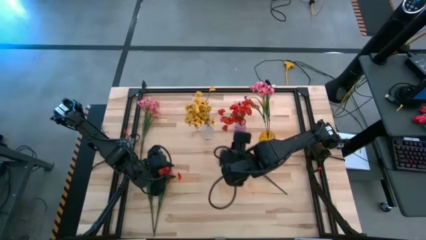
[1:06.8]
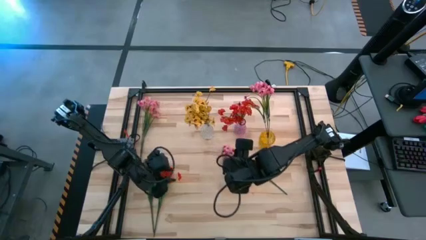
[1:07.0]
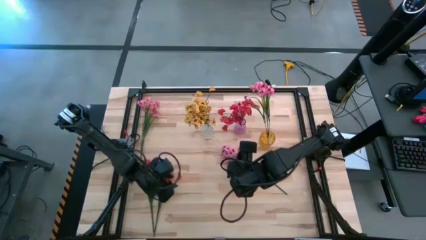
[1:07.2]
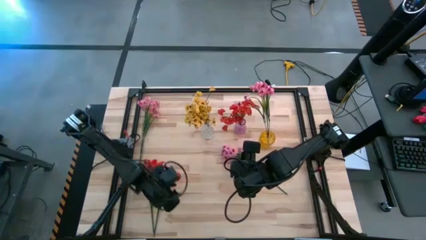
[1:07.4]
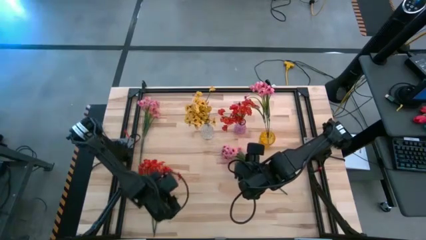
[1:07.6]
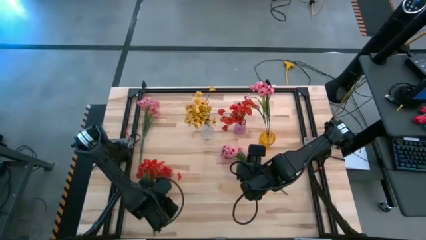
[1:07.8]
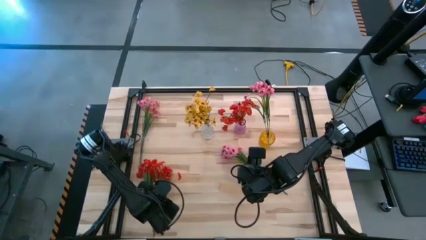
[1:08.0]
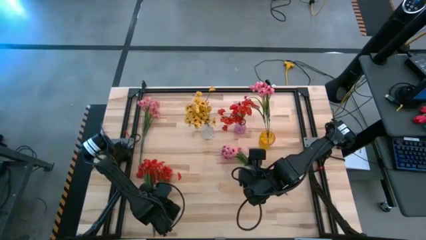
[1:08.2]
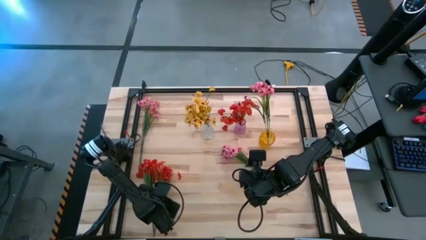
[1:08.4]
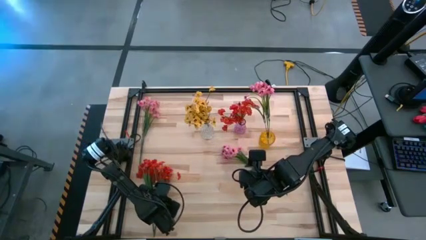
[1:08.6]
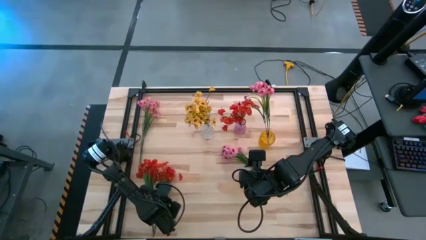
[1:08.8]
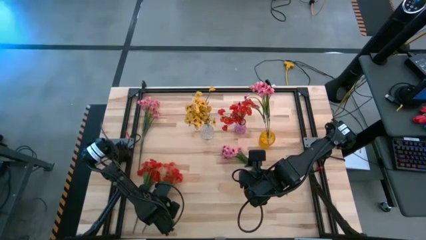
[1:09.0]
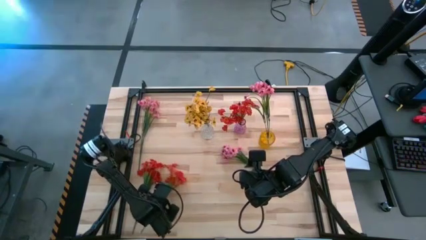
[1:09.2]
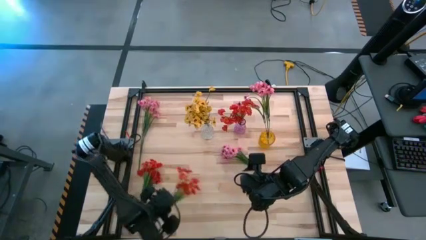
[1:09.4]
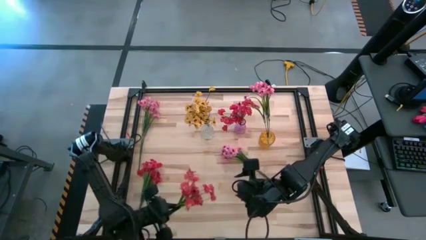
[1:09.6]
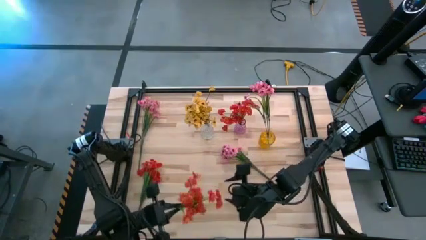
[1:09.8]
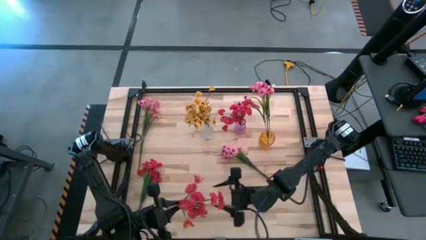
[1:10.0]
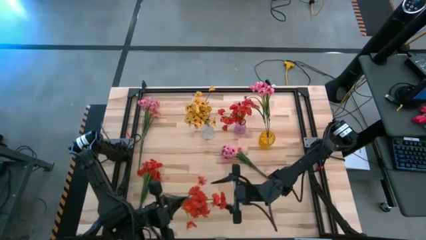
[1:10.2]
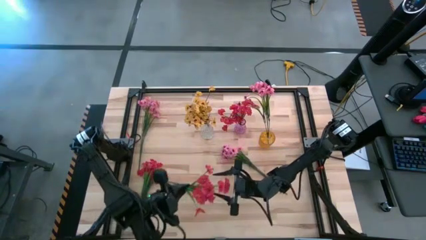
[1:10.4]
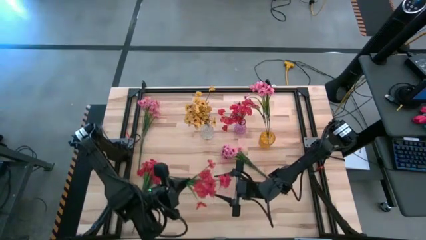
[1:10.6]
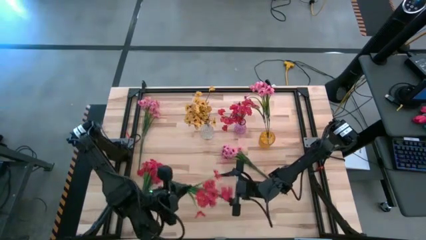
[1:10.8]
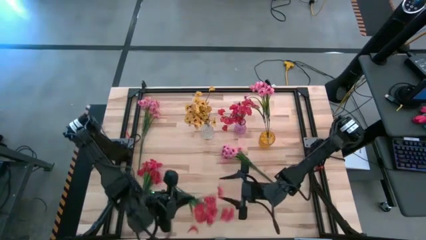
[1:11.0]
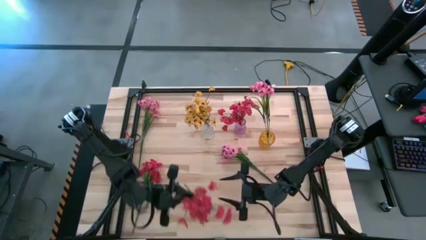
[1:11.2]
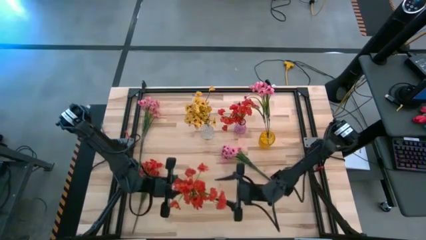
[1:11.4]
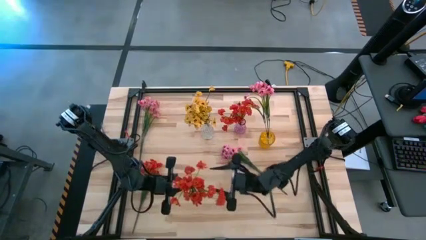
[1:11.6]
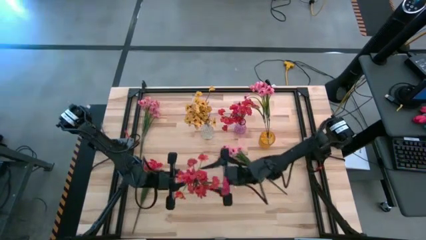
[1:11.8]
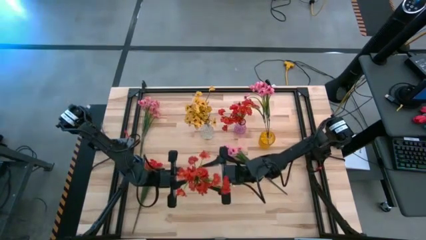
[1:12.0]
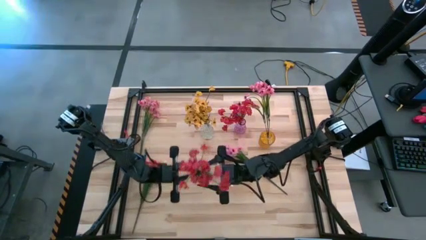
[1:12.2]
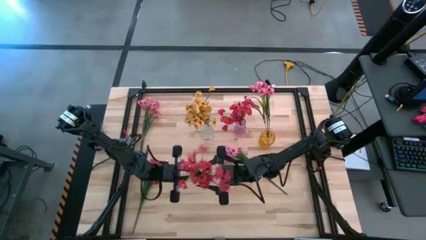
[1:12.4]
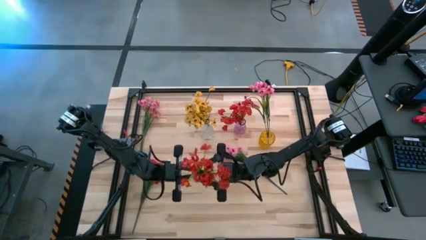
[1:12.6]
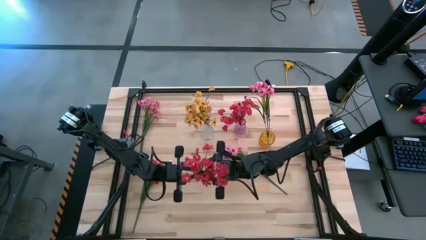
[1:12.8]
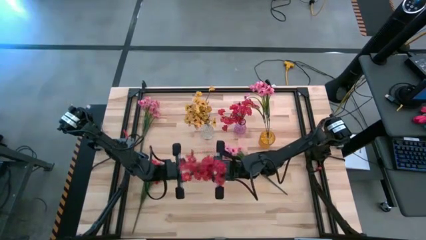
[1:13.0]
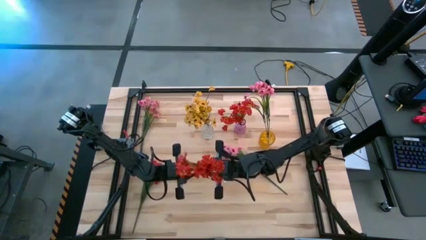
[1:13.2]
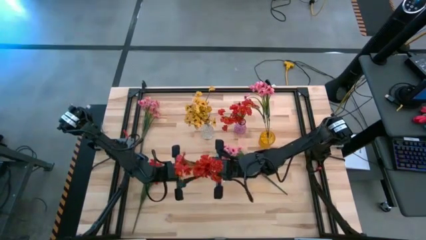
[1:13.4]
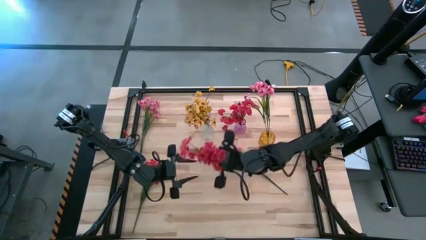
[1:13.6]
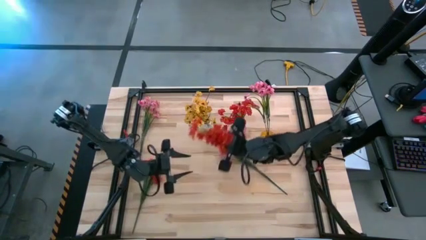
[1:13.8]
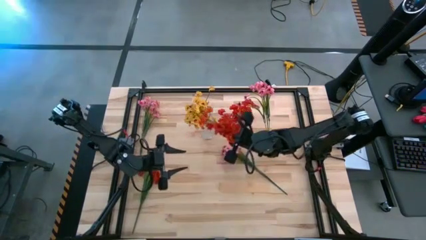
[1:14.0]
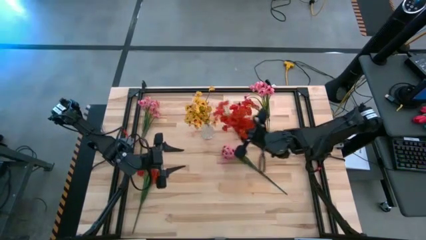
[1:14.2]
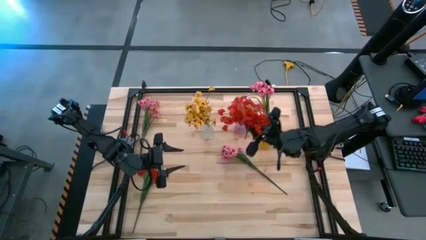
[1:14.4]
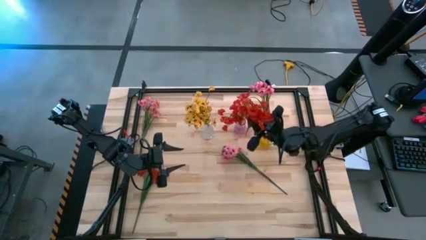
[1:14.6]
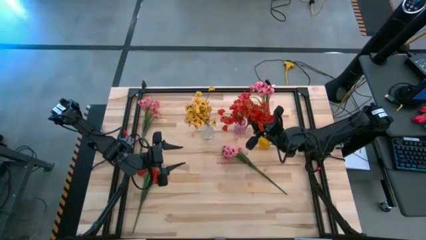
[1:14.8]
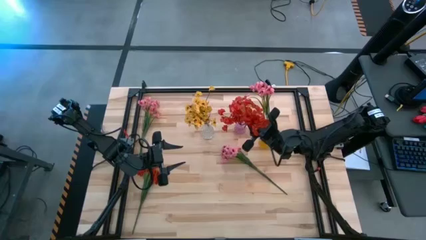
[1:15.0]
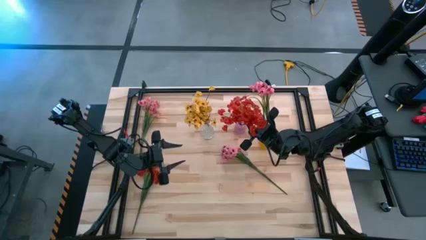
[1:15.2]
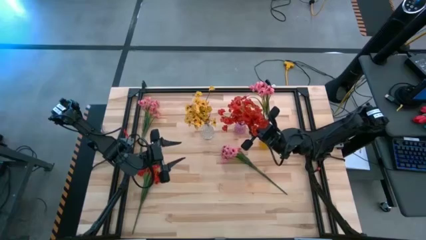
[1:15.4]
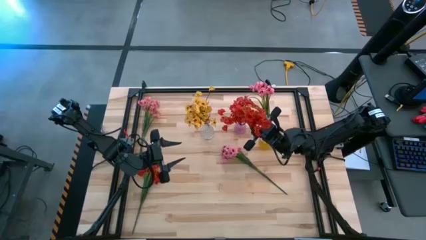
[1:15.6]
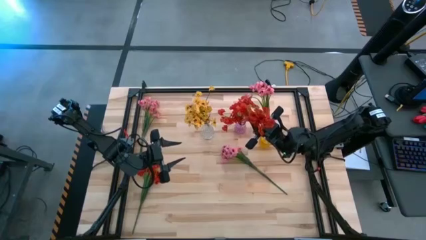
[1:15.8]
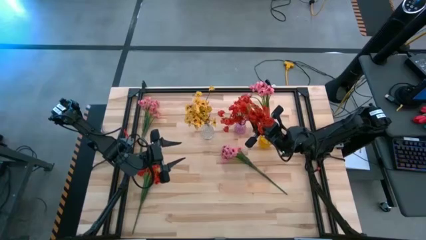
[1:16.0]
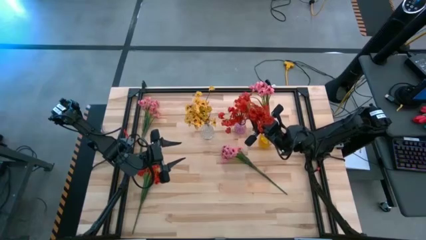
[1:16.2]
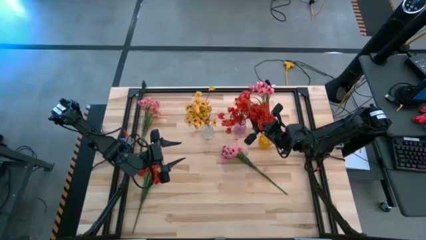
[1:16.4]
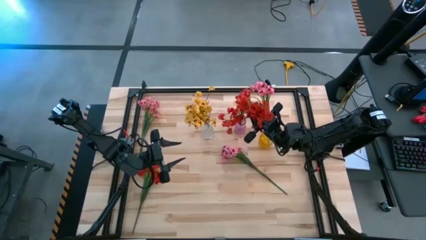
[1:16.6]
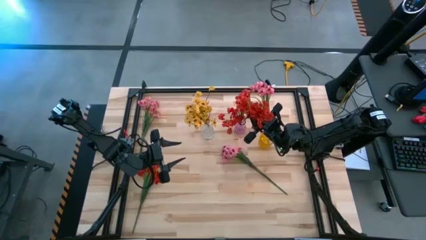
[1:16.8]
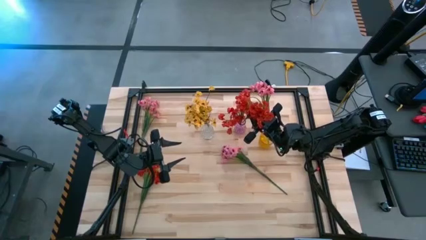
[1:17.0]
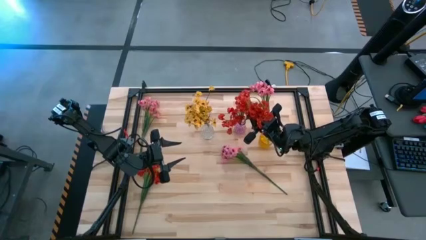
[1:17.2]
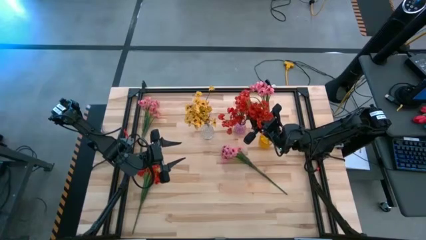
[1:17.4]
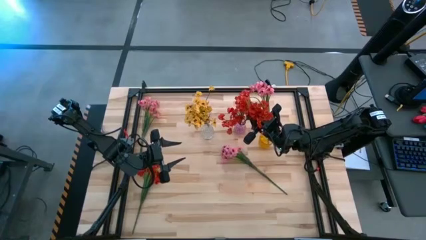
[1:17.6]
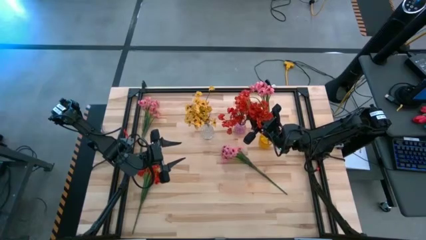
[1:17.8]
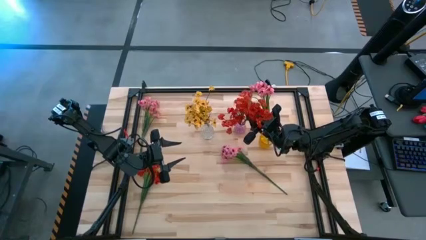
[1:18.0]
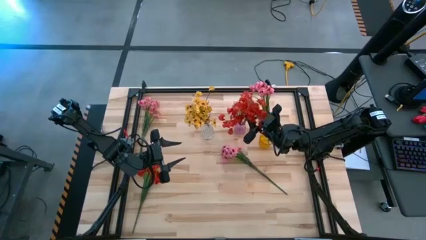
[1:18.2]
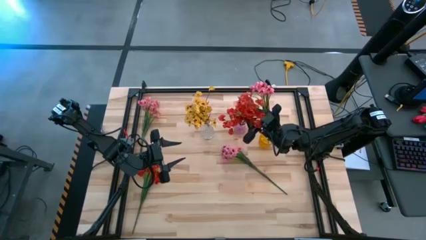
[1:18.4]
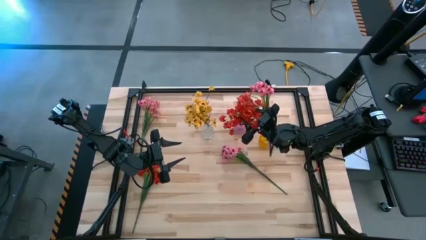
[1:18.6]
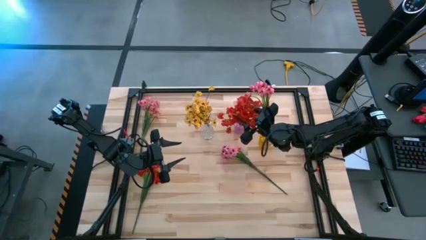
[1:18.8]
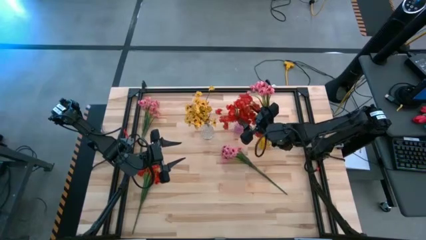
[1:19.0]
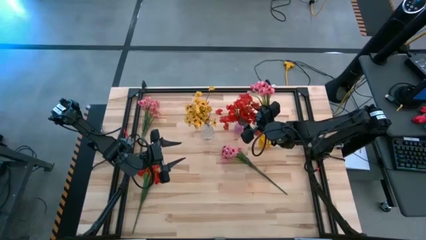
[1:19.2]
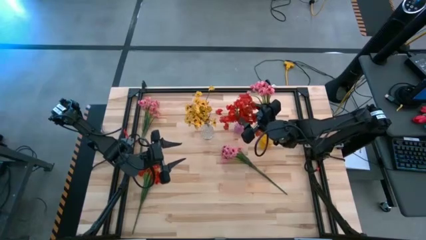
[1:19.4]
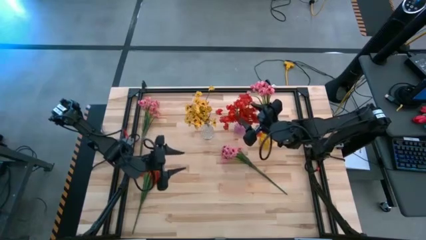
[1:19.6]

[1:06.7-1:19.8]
Task: Sort flowers into vase by color
Put the right red flowers into the pink vase

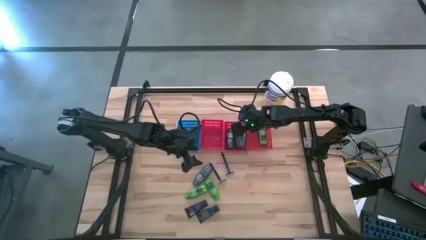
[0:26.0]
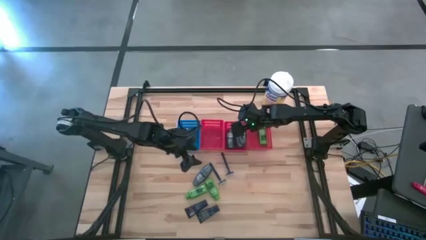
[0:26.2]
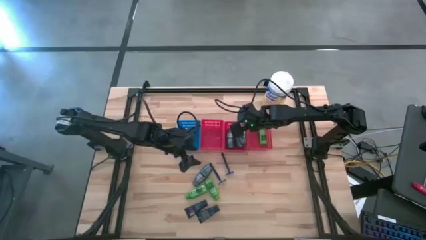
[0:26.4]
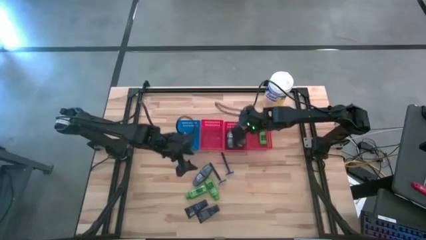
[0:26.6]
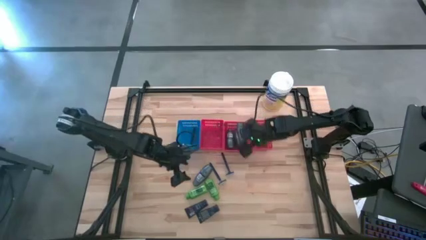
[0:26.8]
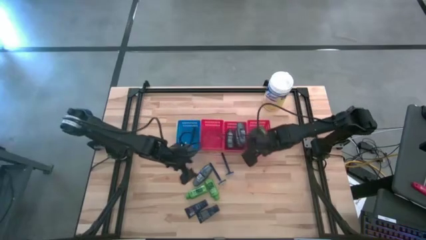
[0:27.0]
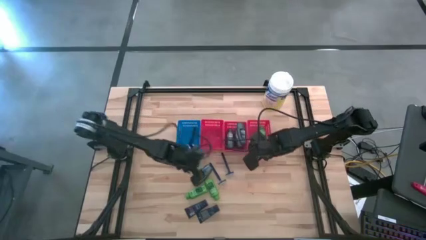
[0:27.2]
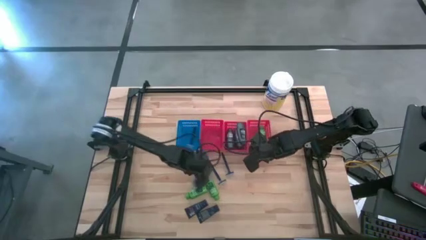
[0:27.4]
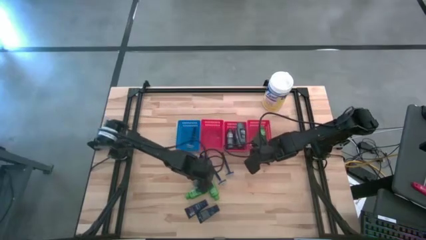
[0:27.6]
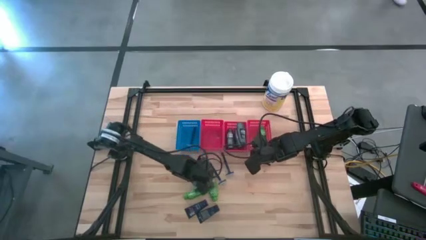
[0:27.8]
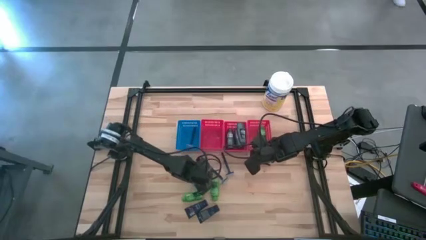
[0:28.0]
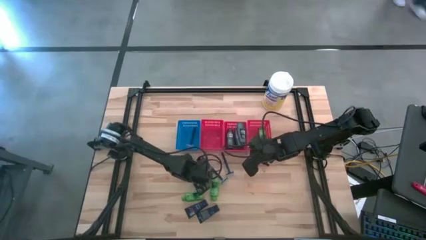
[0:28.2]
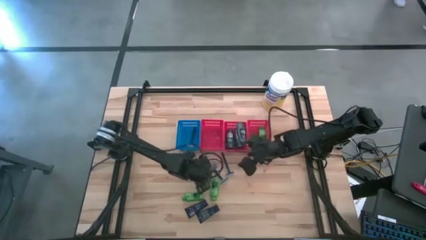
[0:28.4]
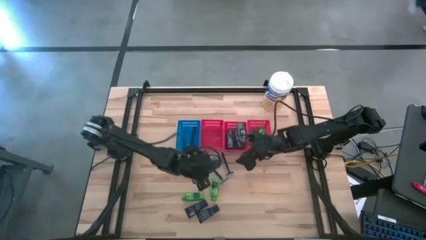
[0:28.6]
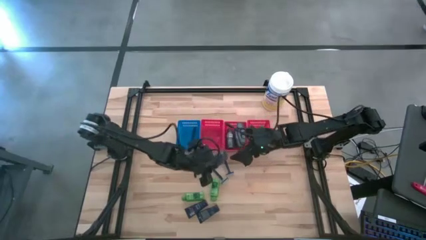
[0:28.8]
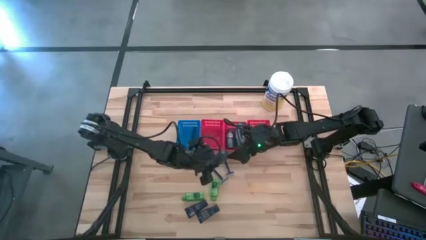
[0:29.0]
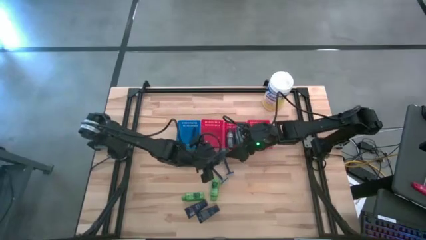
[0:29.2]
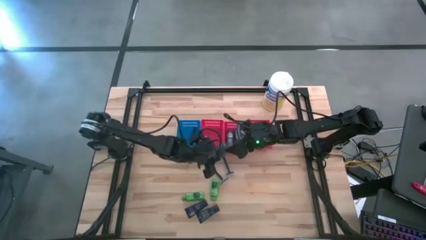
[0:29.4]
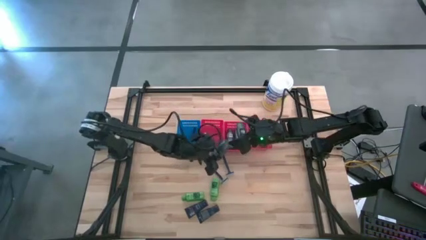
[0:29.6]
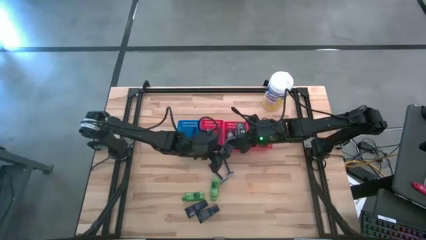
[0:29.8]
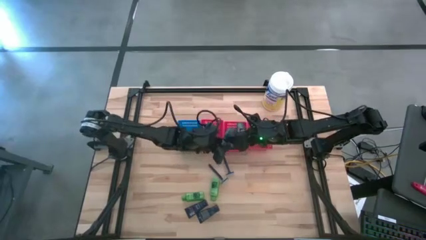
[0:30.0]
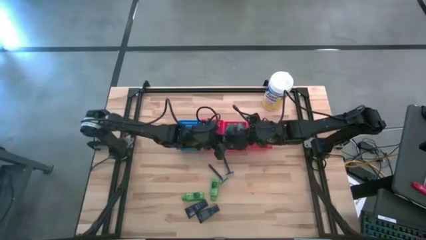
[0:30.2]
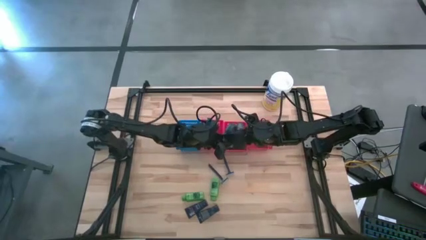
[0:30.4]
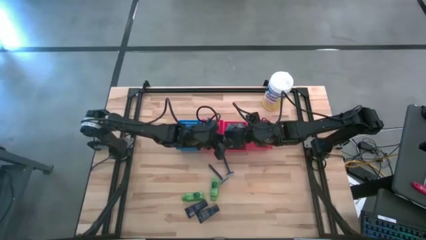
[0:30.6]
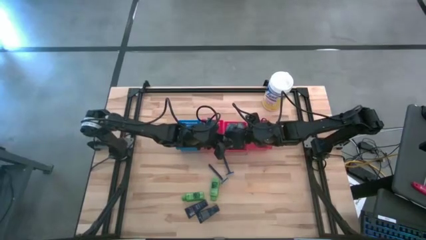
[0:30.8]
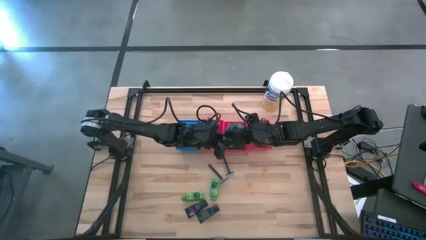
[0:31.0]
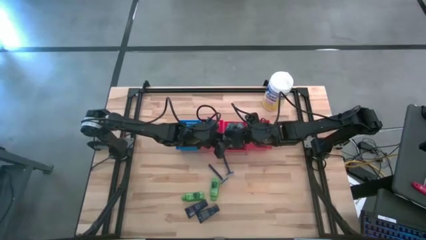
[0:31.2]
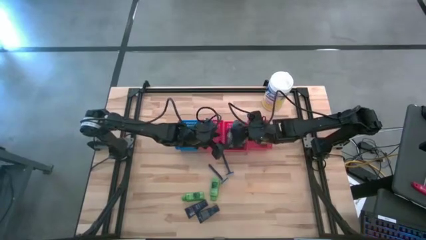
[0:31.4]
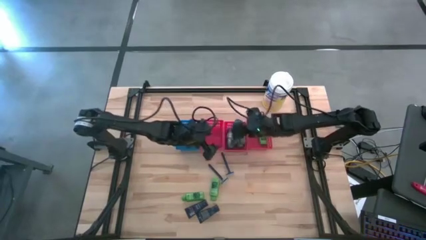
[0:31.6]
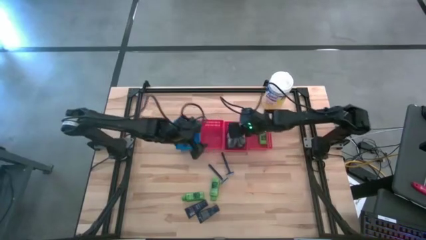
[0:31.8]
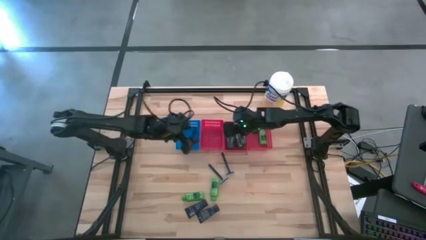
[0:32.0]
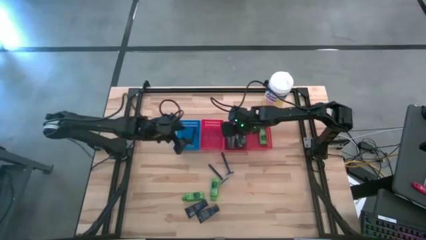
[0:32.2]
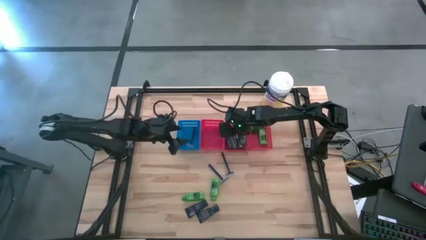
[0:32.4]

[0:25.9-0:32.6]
Task: Pick & Place Travel size toiletries
Put the gray deodorant into the middle red bin
